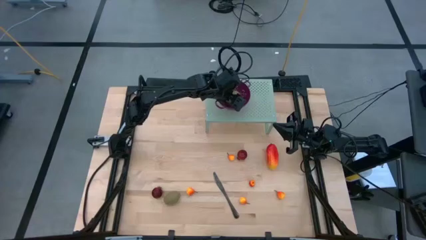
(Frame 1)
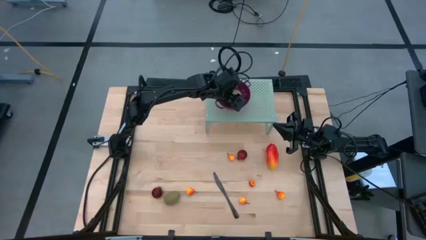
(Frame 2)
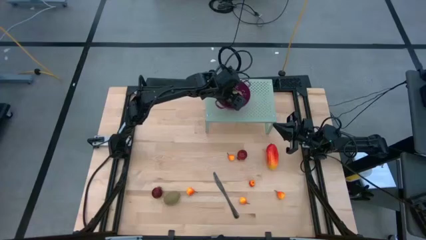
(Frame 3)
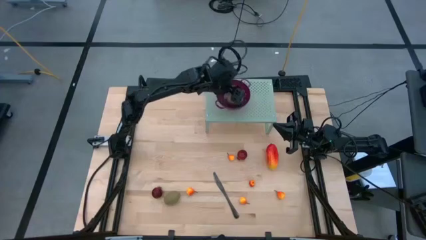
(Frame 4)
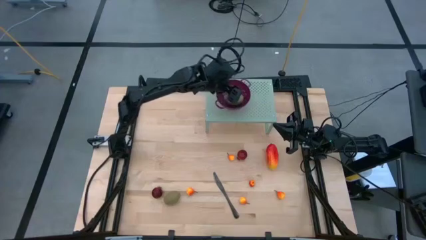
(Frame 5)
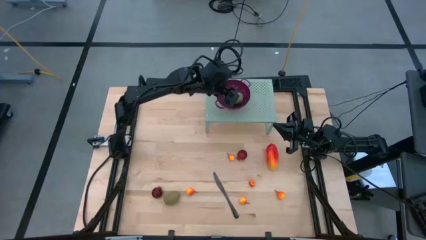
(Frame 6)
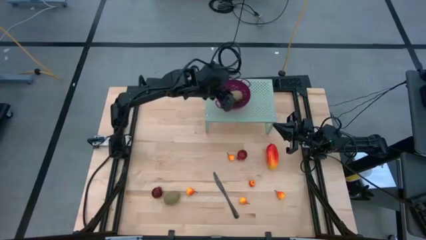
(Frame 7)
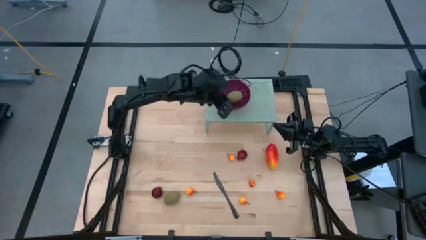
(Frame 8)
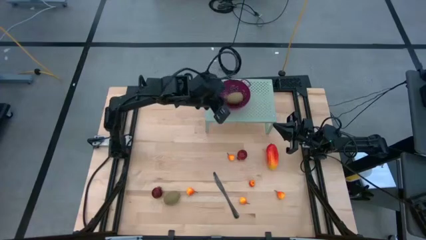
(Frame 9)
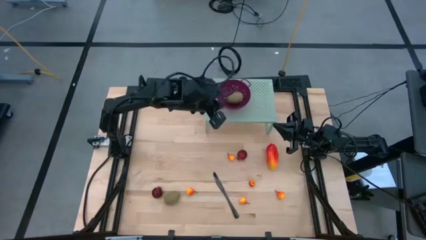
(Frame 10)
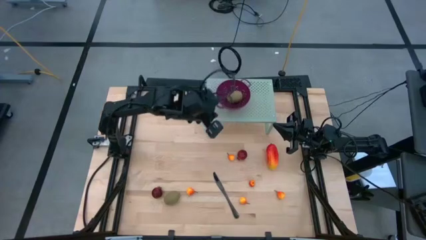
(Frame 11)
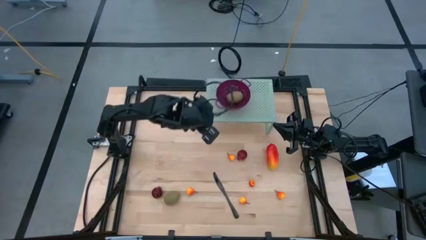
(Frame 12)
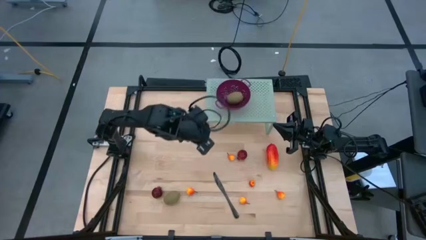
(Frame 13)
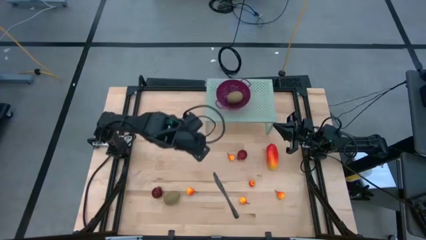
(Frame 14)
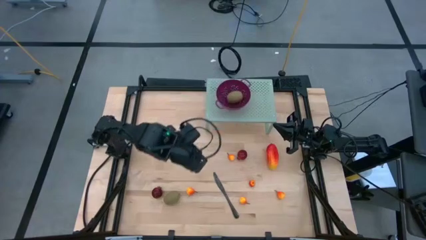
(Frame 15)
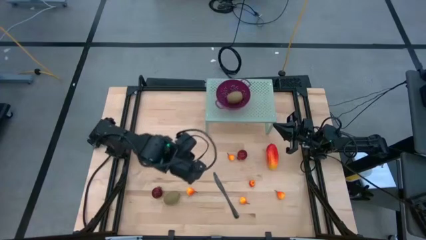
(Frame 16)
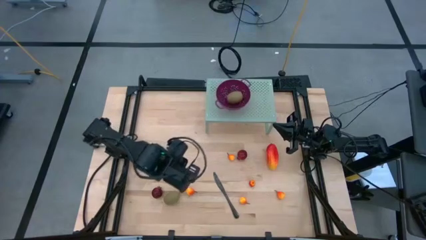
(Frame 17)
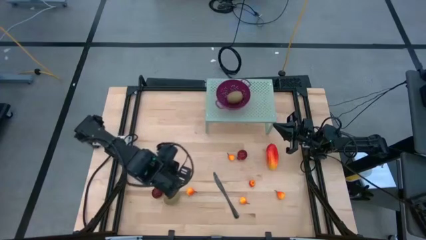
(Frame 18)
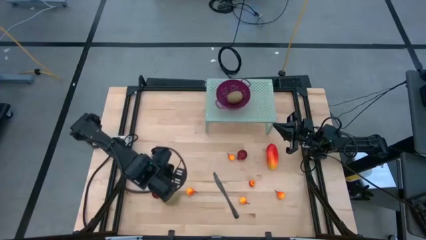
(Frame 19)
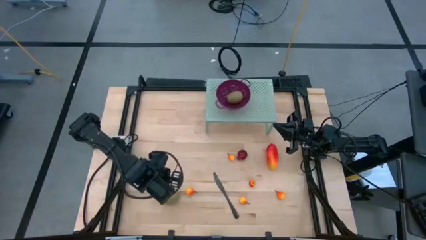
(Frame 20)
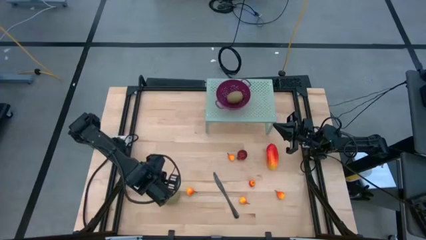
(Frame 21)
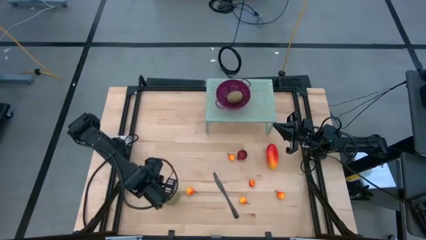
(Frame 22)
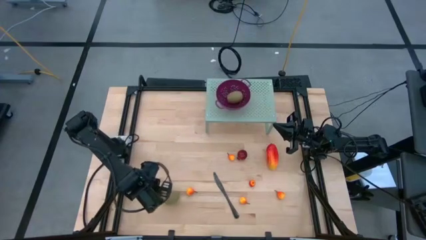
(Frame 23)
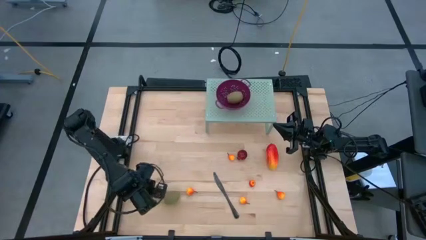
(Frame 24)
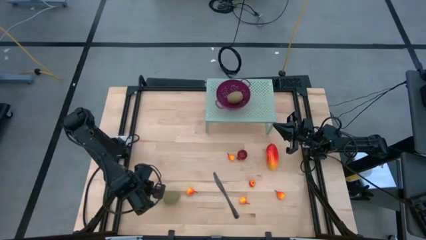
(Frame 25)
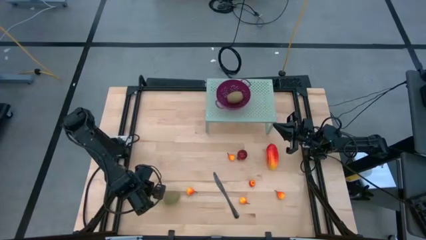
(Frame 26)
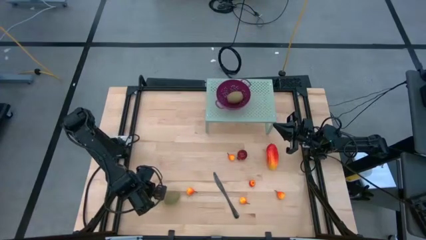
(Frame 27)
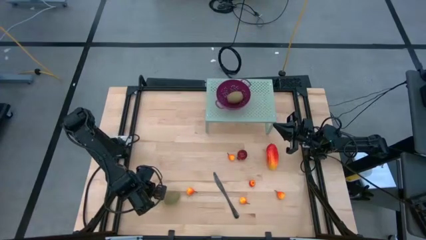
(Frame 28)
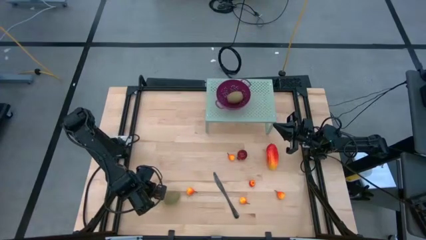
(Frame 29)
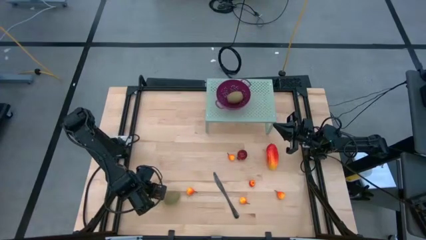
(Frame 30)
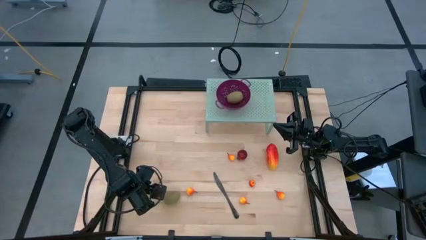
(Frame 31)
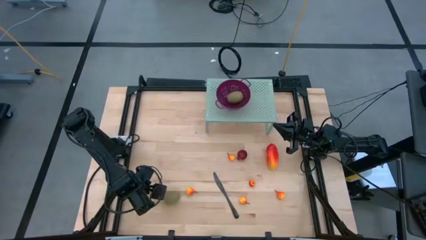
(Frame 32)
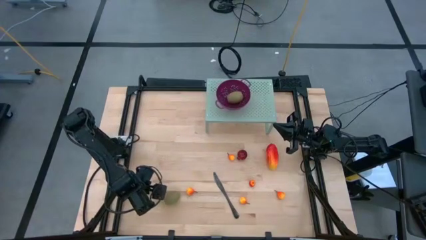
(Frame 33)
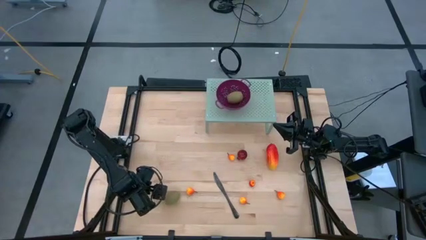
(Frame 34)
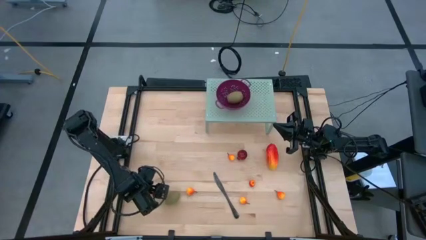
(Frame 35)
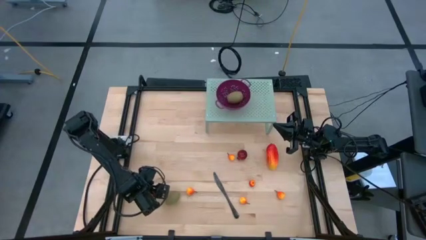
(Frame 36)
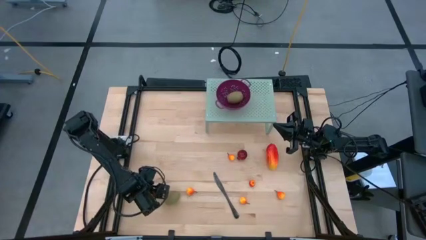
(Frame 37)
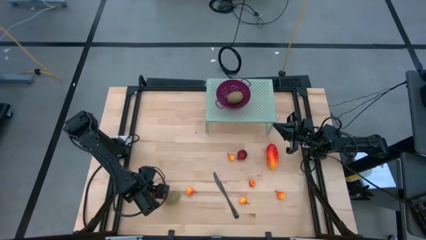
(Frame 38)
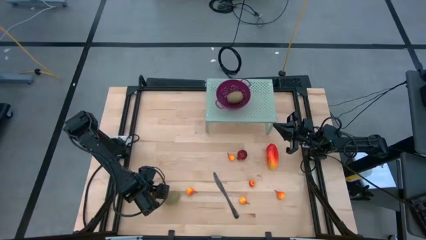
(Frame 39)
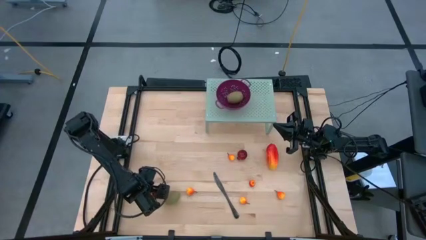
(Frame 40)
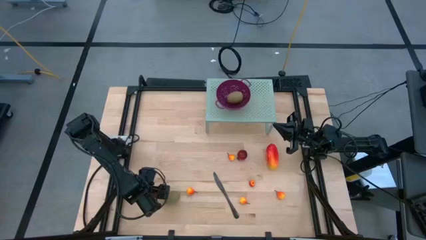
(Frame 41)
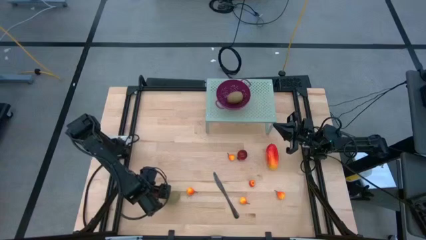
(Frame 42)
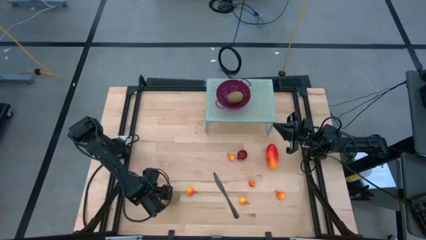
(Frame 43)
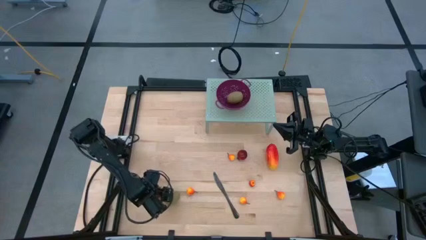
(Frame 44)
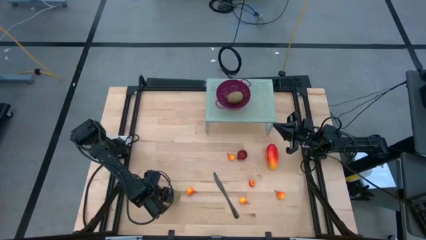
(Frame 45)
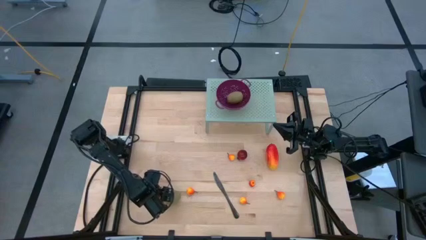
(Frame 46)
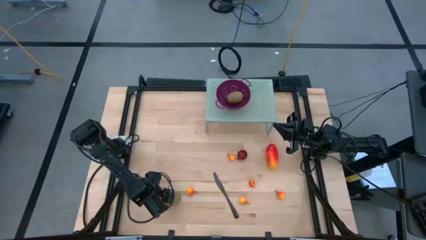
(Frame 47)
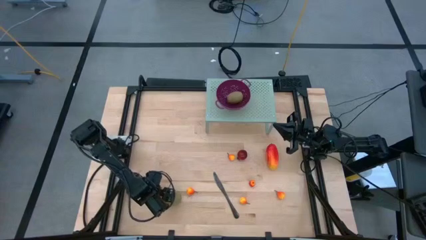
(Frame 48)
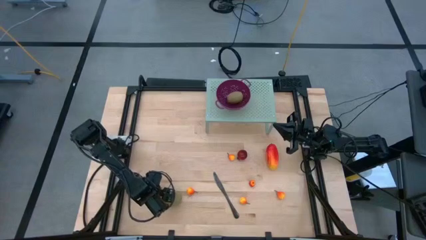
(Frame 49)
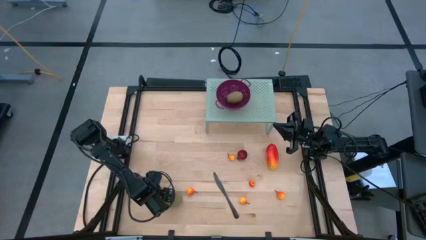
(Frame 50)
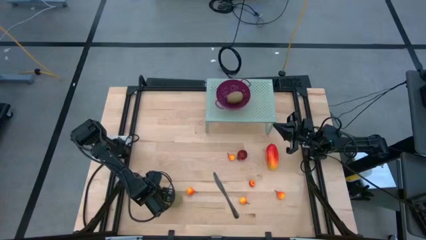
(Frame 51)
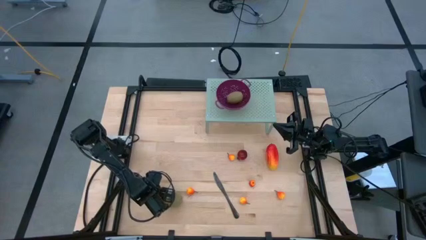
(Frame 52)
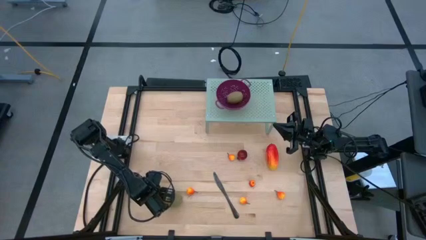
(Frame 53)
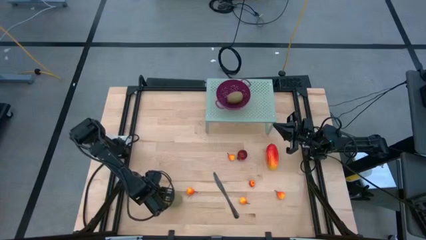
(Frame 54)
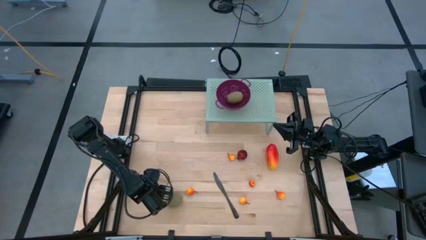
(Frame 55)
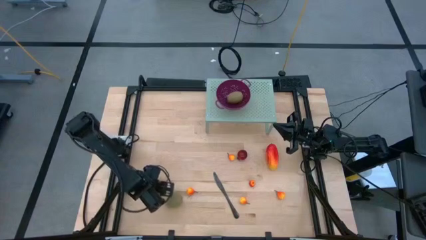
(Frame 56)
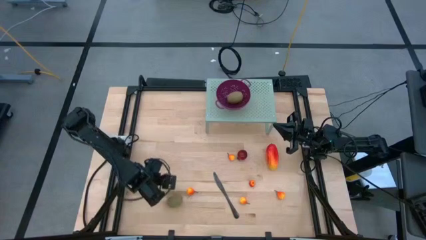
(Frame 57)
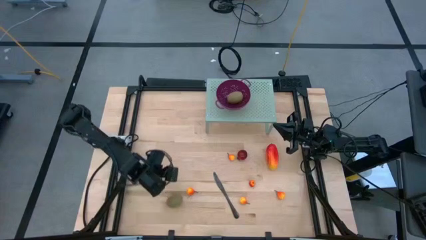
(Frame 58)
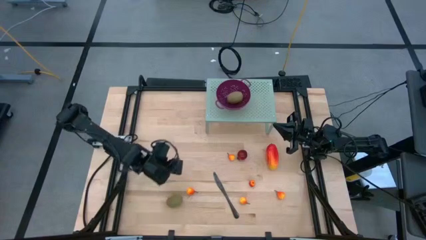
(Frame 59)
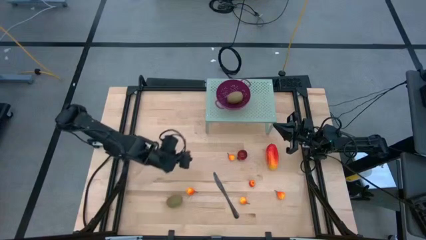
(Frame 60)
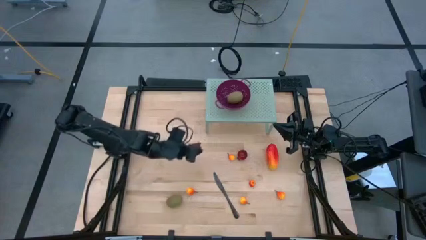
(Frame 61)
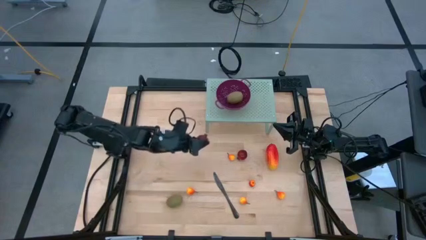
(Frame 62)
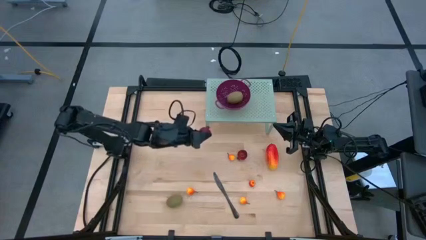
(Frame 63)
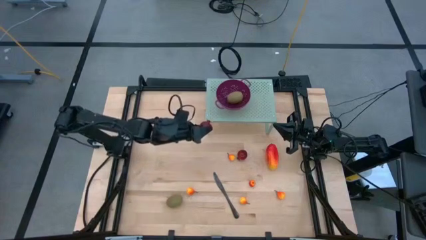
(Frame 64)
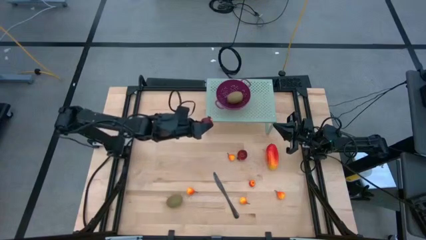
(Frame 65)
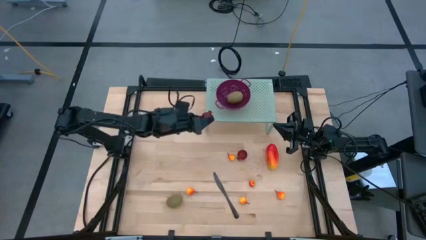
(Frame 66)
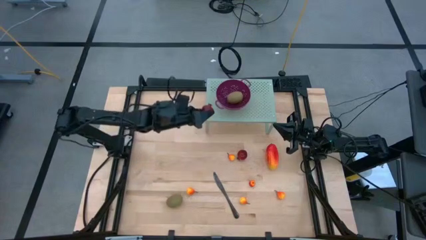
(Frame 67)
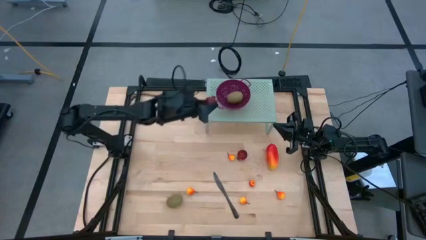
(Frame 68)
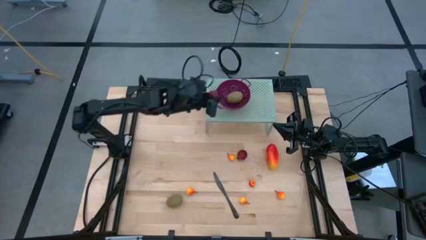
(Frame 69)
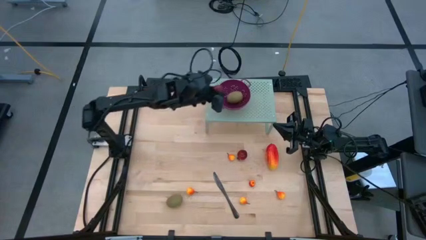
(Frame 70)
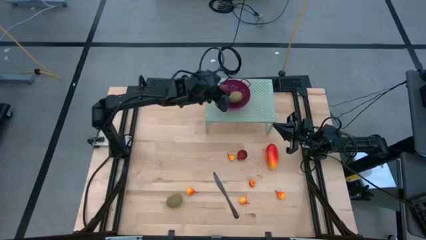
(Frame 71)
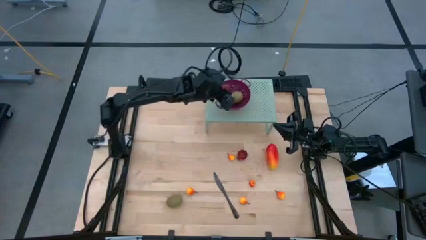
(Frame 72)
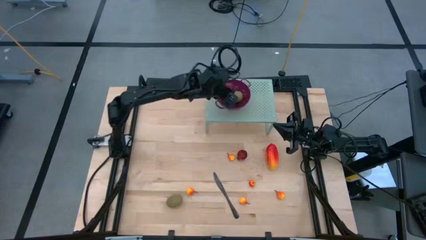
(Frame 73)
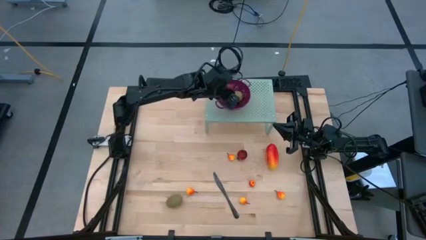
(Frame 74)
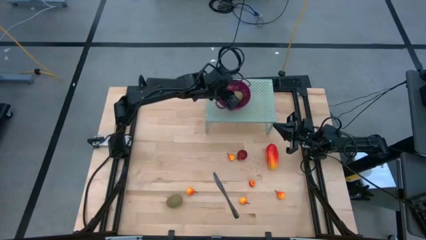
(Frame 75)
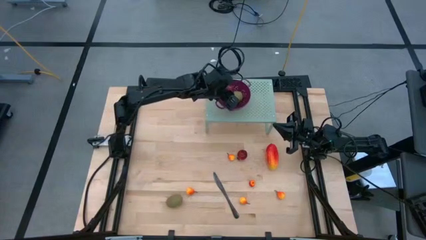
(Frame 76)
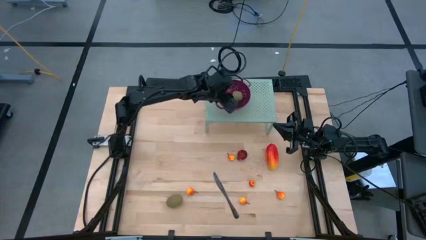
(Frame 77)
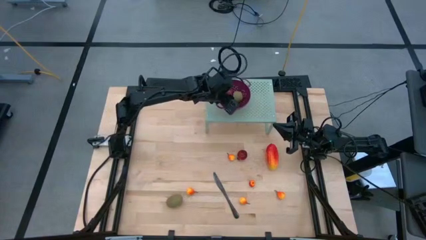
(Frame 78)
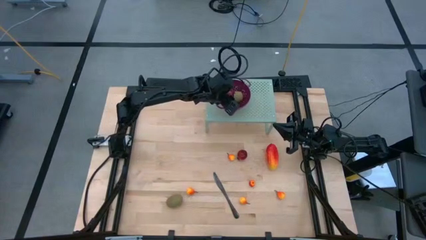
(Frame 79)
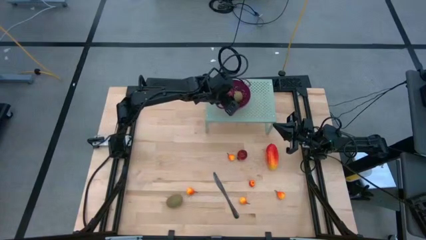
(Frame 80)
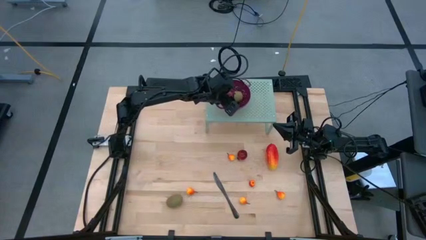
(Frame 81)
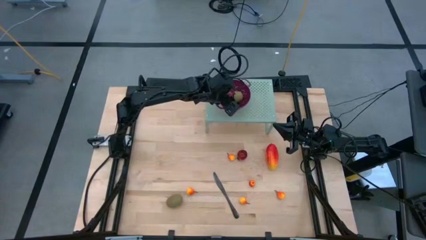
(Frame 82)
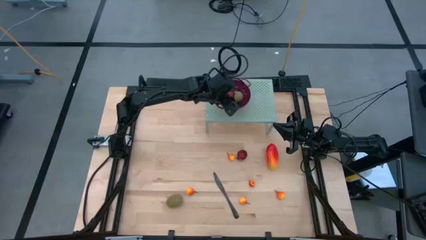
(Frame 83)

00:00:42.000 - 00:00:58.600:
Task: Pick & Place Fruit
Put the red pomegranate into the violet strainer bowl on the shelf
